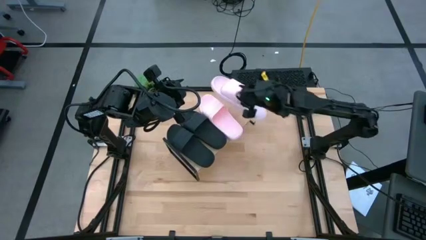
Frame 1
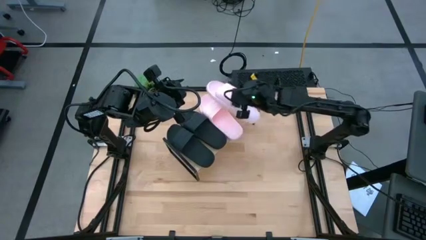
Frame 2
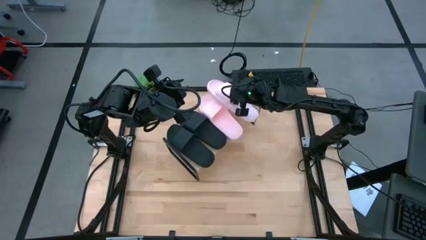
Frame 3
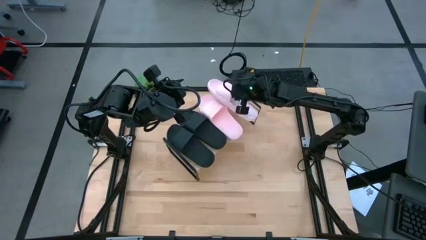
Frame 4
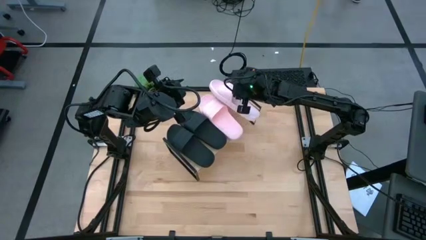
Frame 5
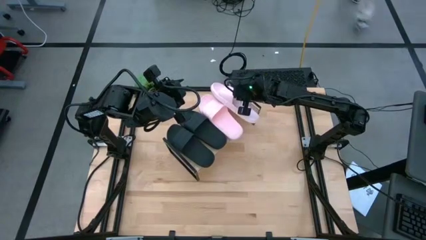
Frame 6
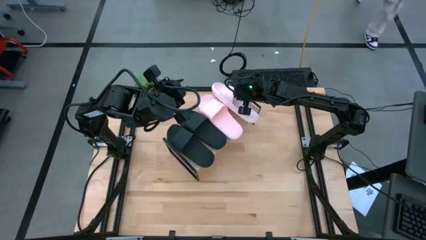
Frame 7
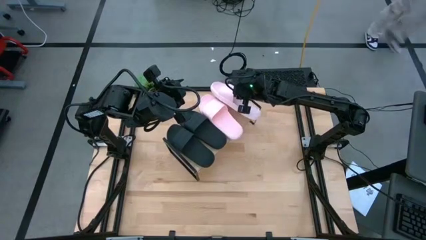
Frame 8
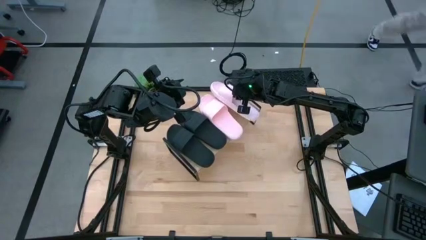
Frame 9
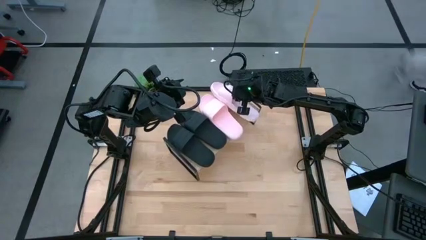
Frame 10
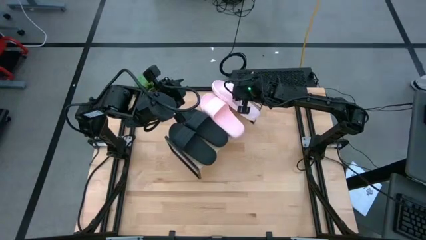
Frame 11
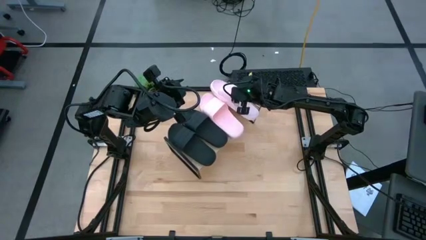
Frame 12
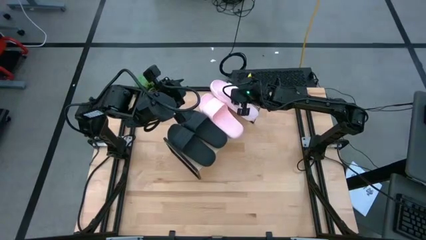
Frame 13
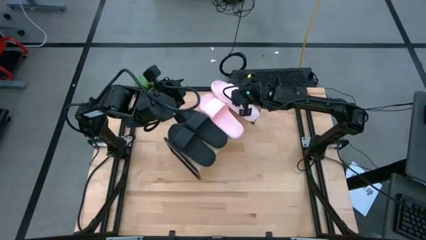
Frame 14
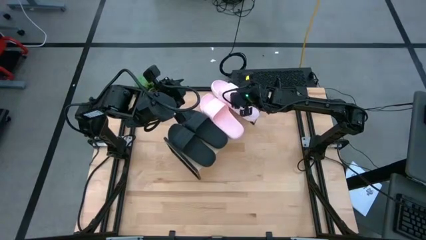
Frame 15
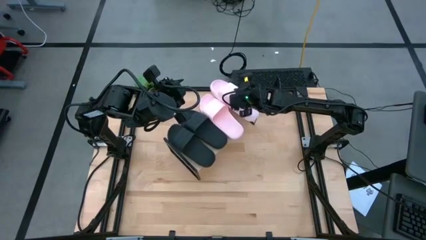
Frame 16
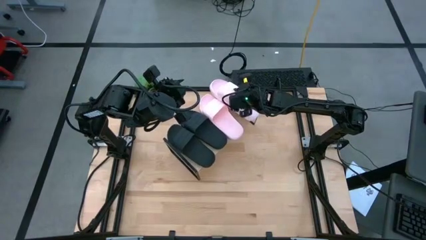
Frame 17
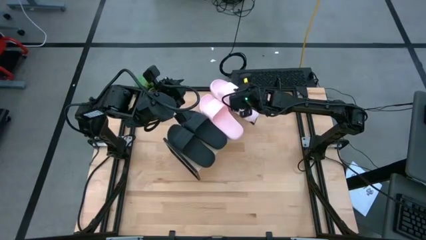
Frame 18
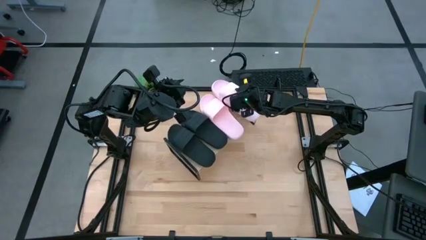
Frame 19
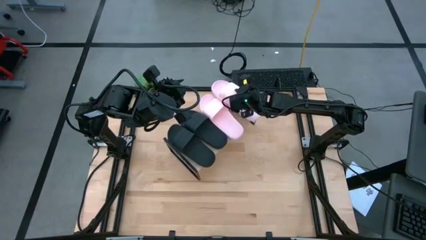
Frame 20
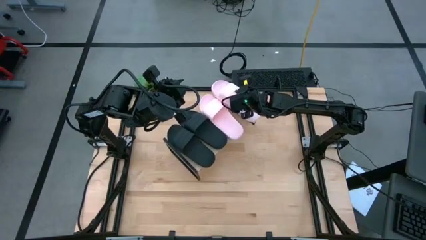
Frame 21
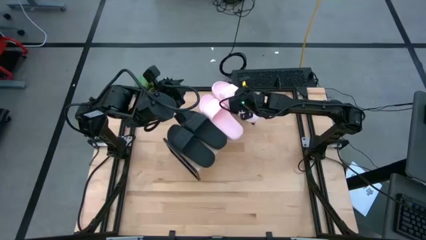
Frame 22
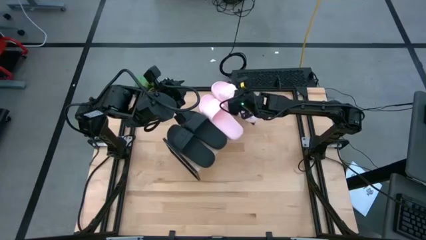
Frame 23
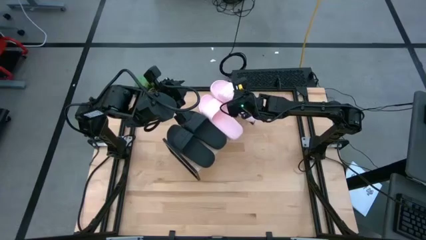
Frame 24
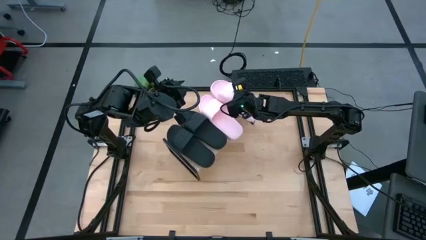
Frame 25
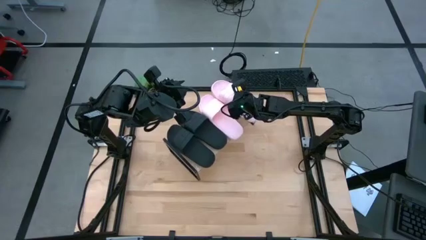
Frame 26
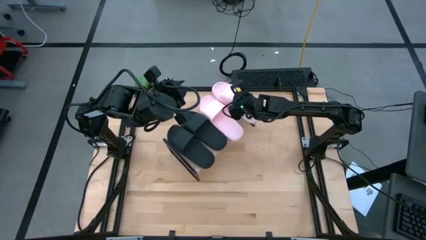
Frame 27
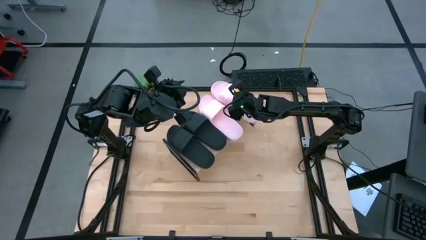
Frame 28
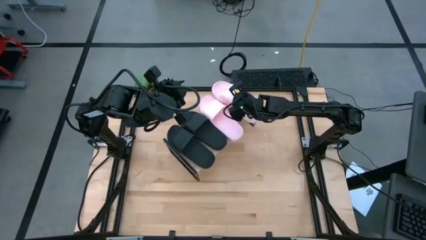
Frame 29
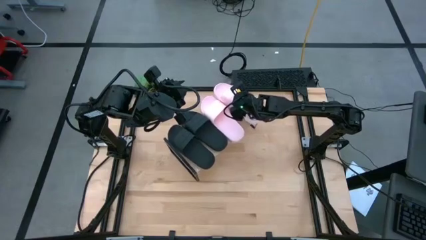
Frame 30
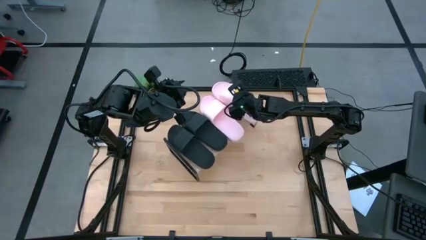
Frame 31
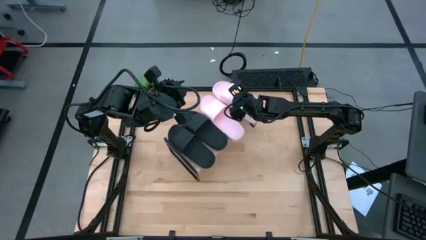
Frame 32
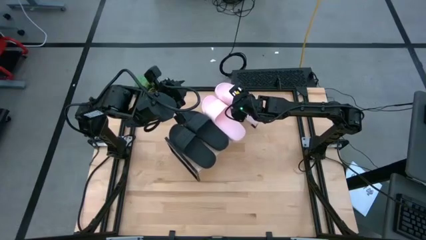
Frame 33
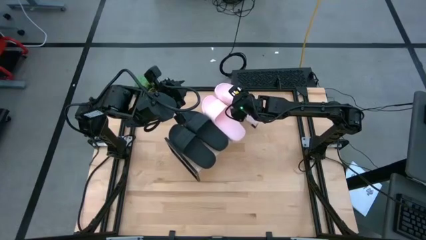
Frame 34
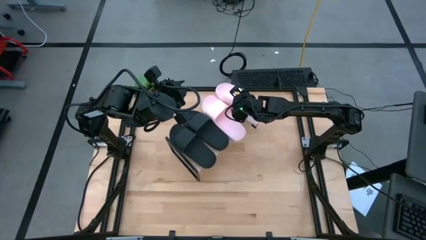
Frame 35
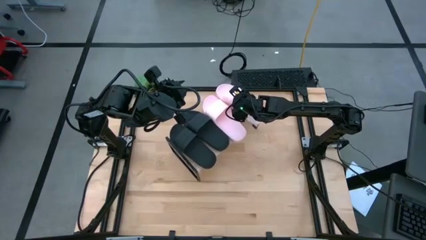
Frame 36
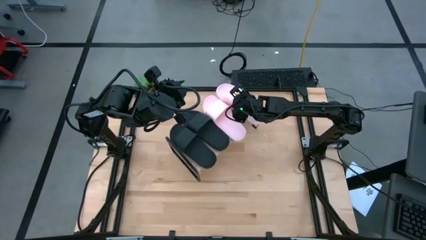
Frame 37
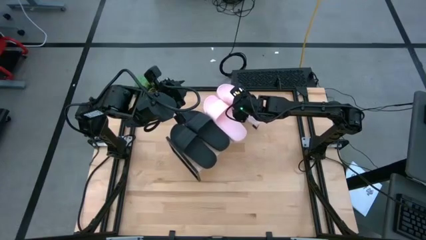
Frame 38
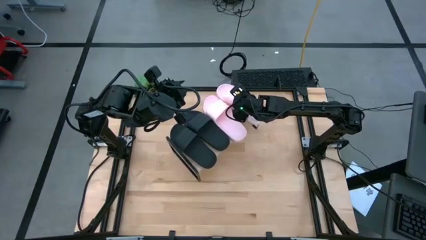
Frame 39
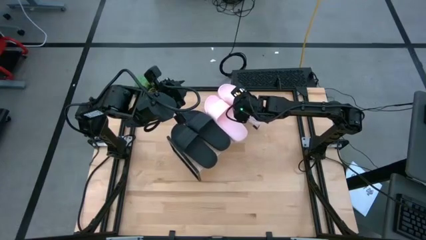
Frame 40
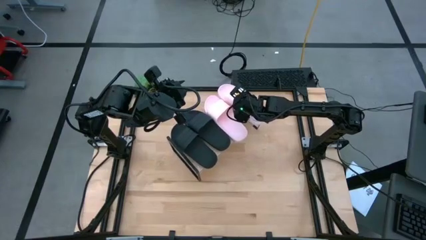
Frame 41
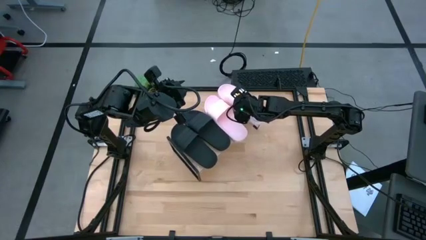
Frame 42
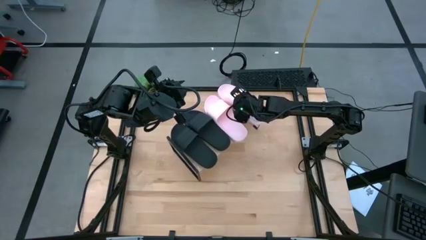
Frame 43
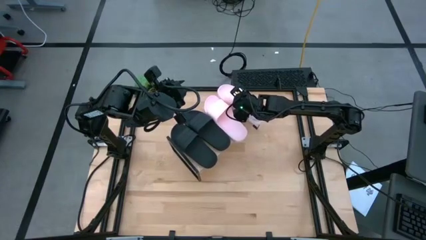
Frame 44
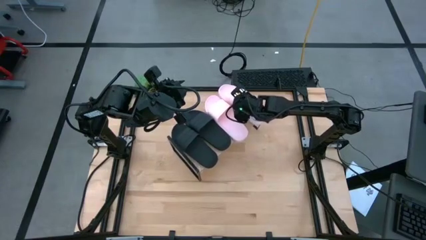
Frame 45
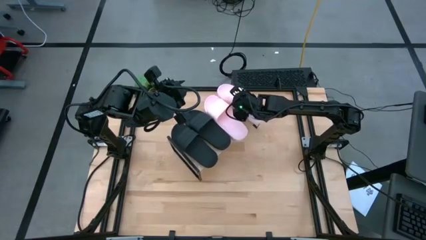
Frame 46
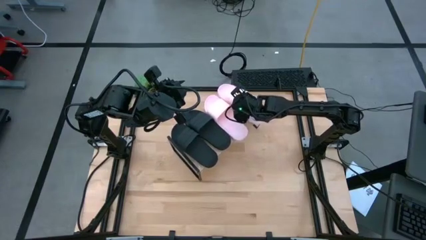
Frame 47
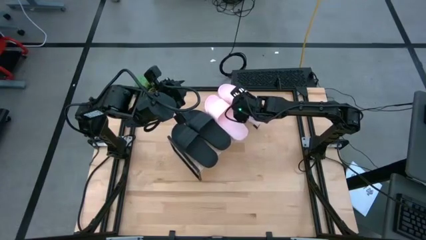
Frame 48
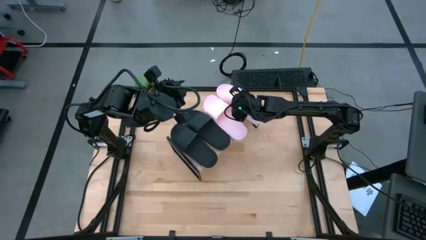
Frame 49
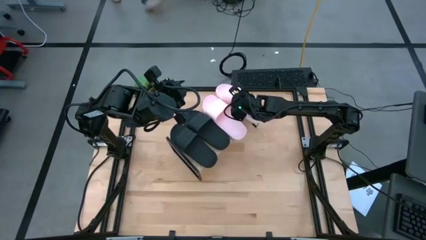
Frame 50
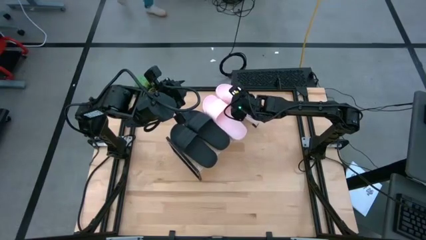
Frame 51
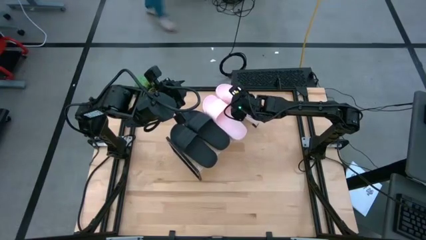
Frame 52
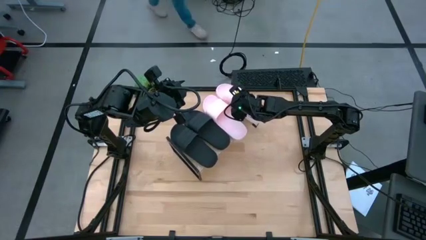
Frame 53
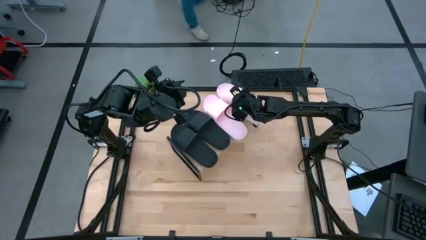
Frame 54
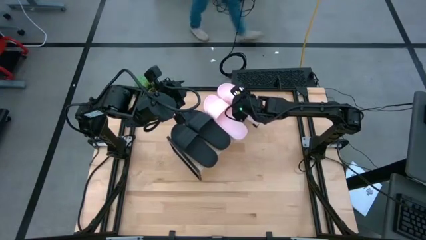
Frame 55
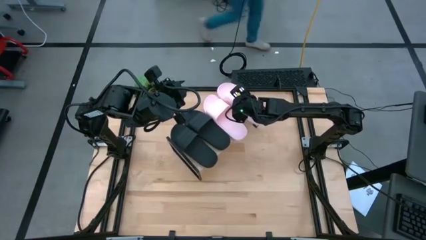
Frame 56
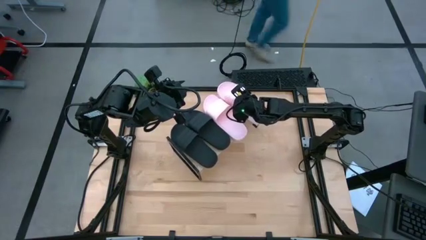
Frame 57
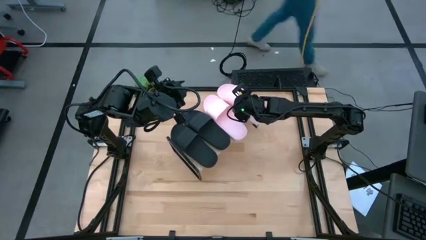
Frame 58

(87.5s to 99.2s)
Task: Pick and place slides into the shelf
Put the pink slide on the shelf

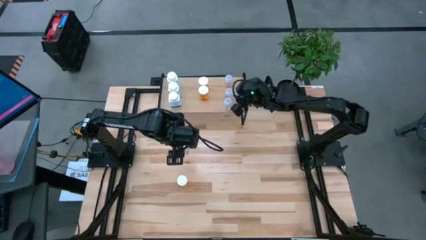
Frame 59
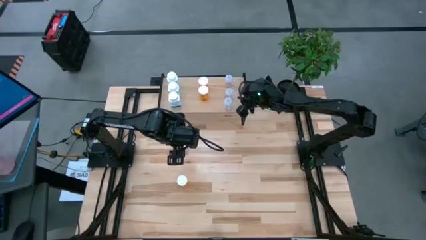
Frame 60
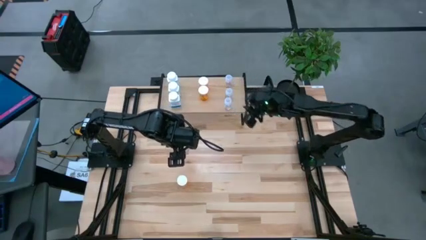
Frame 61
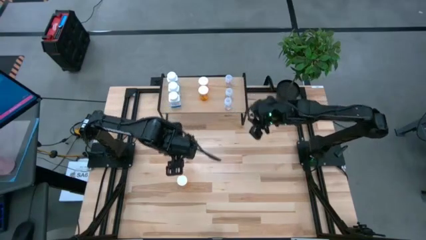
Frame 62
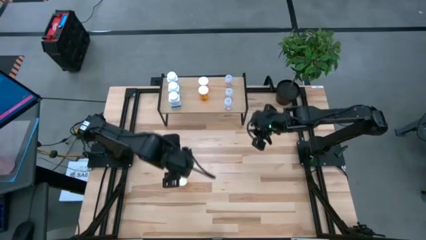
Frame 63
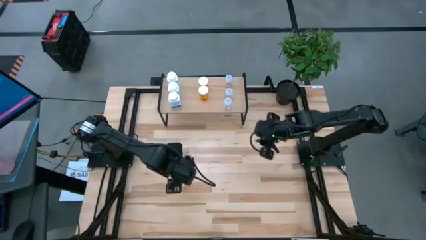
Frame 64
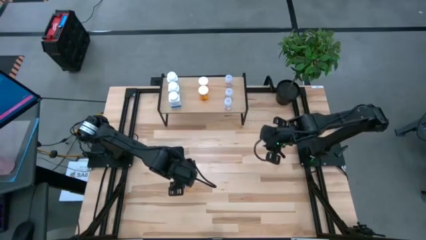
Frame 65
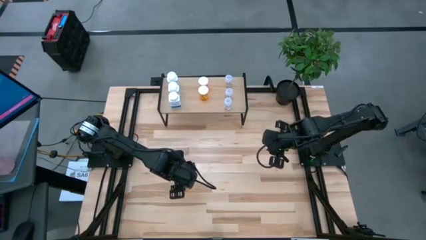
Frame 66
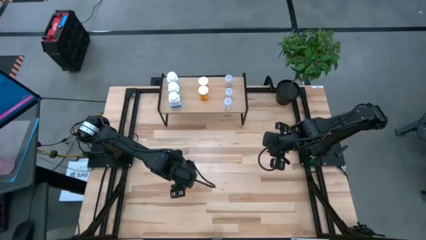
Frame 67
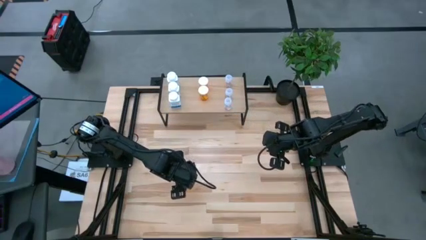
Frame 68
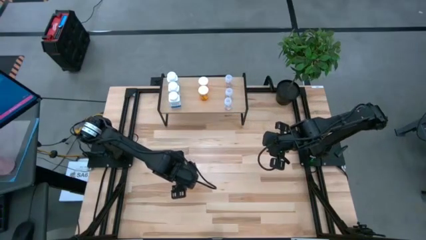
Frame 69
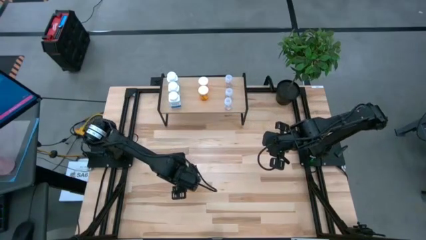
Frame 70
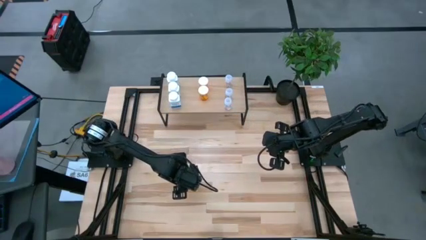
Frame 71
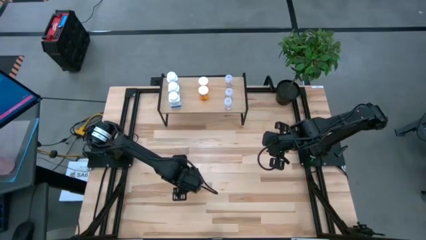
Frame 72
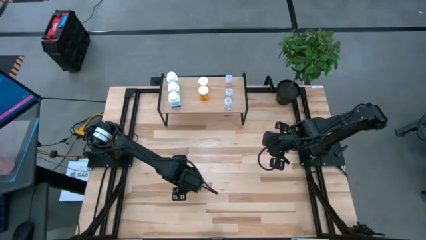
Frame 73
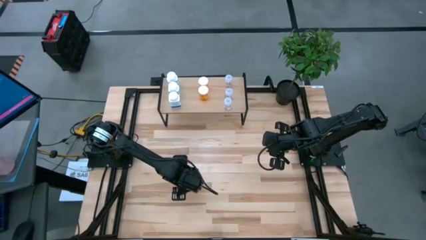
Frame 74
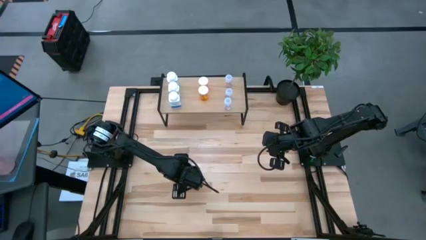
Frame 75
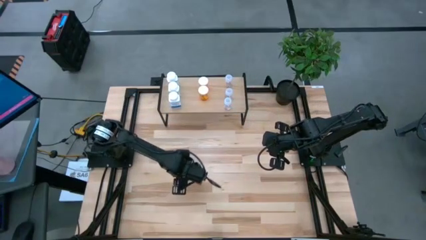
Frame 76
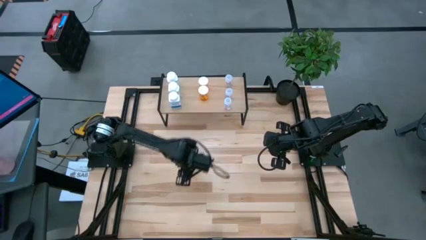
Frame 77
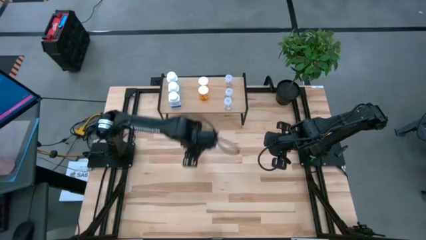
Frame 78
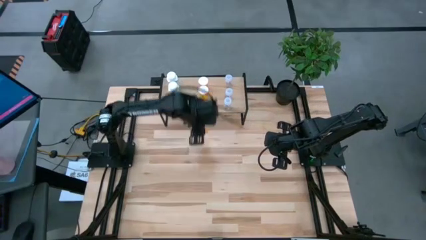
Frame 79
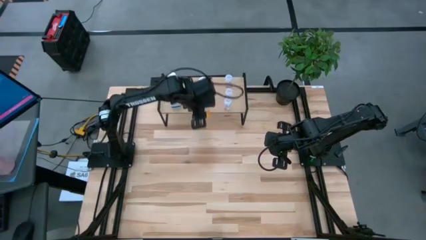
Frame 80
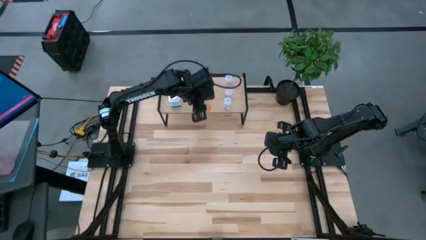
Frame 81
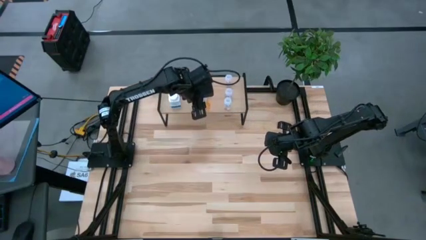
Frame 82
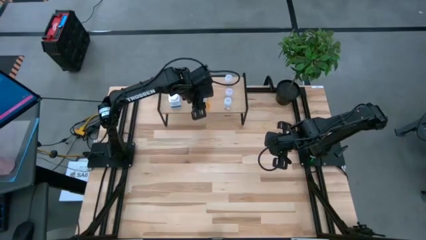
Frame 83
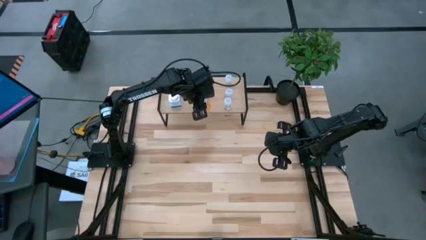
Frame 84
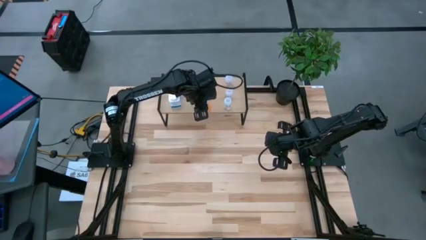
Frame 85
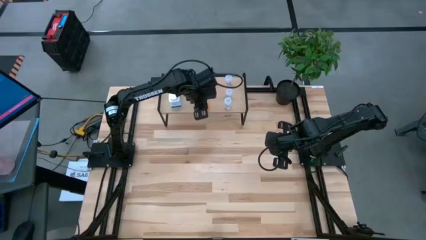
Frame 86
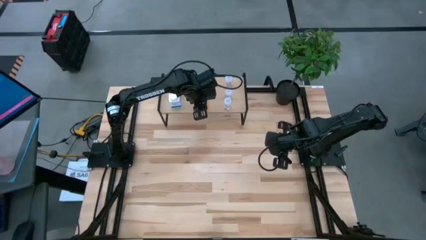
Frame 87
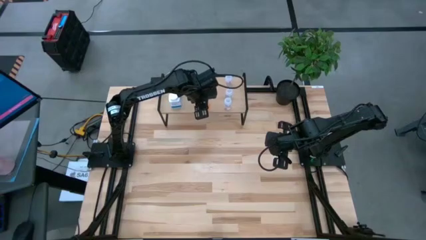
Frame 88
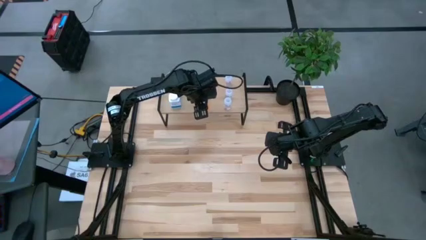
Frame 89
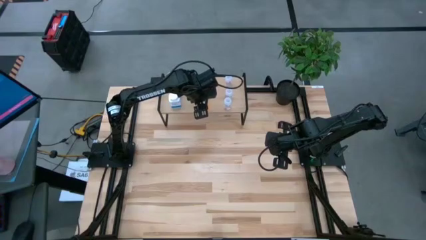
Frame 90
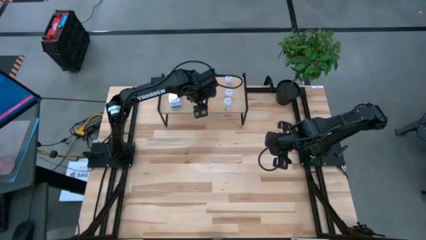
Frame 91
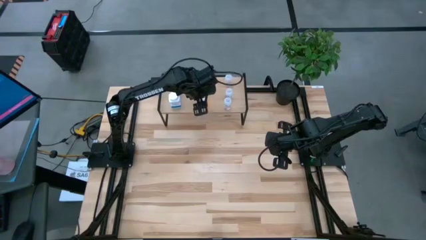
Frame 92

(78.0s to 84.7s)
Task: Pick and place medicine bottles onto shelf by color
Put the orange pill bottle on the shelf aligned with the other orange pill bottles
